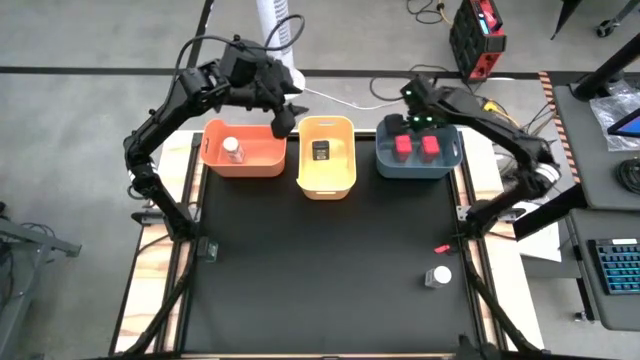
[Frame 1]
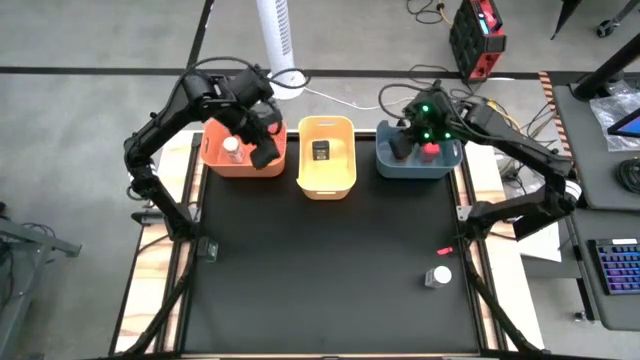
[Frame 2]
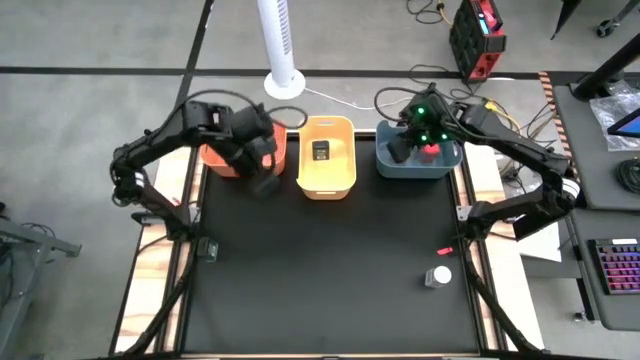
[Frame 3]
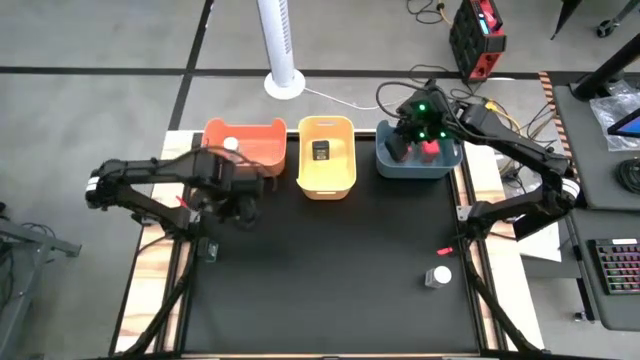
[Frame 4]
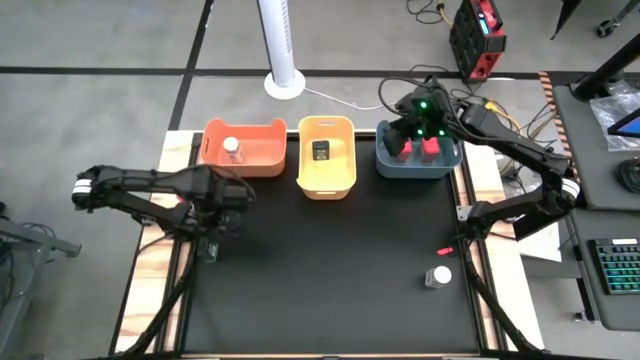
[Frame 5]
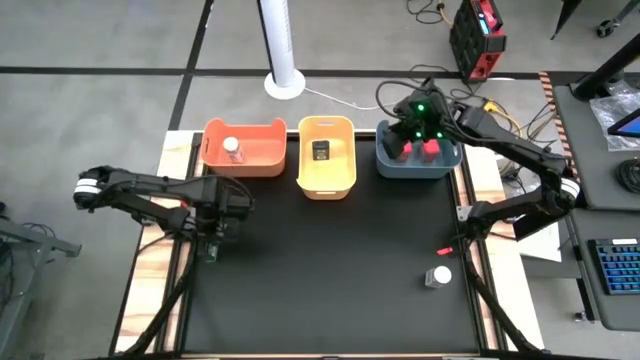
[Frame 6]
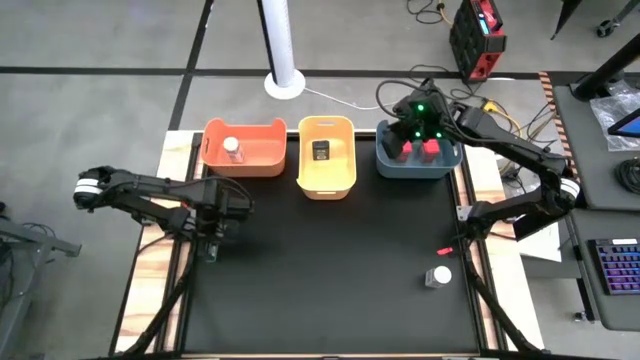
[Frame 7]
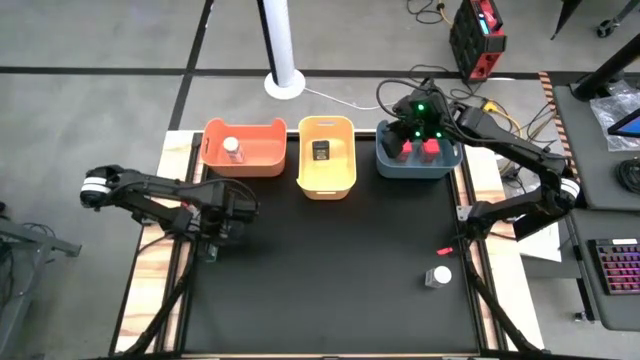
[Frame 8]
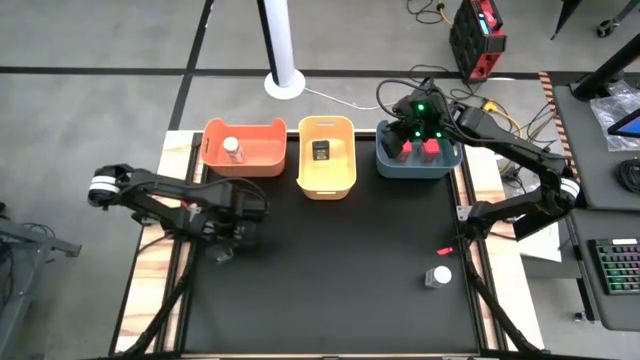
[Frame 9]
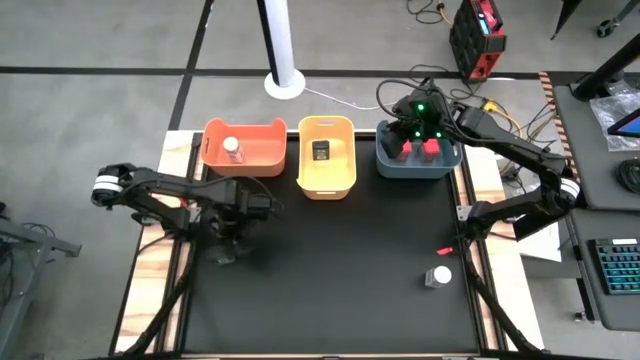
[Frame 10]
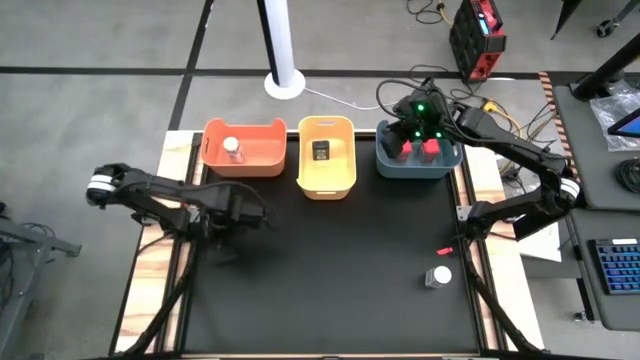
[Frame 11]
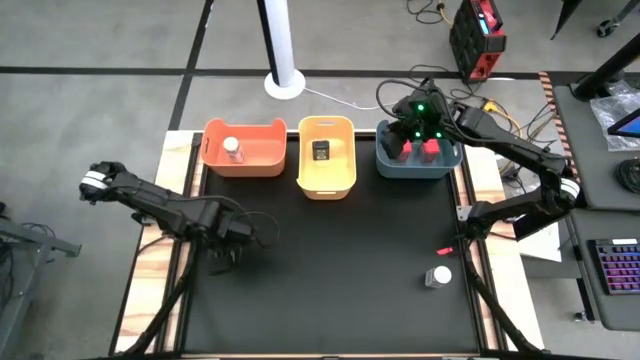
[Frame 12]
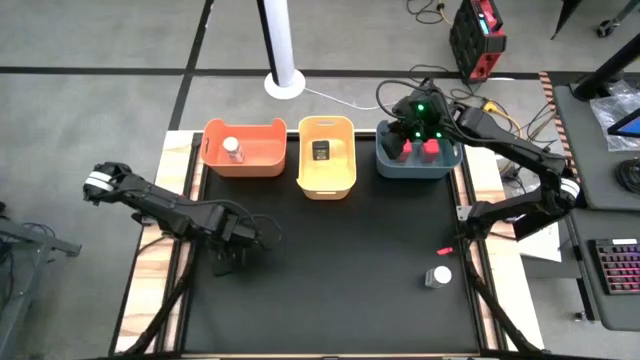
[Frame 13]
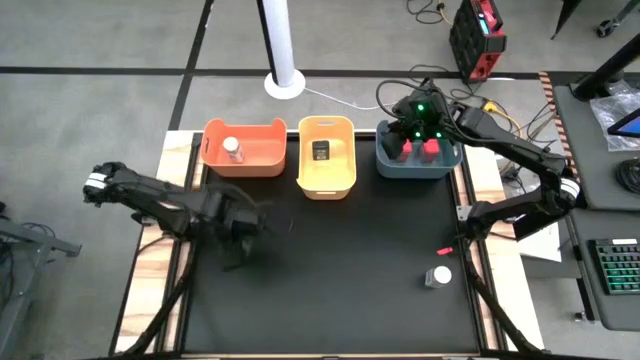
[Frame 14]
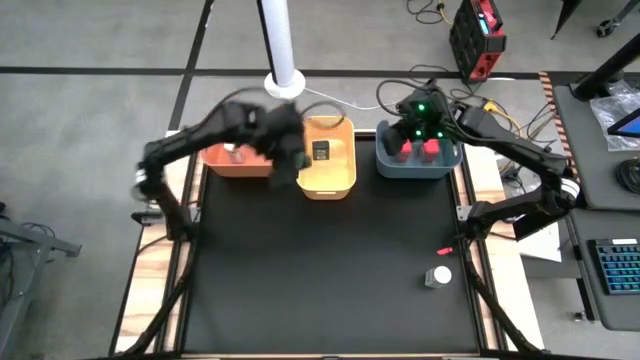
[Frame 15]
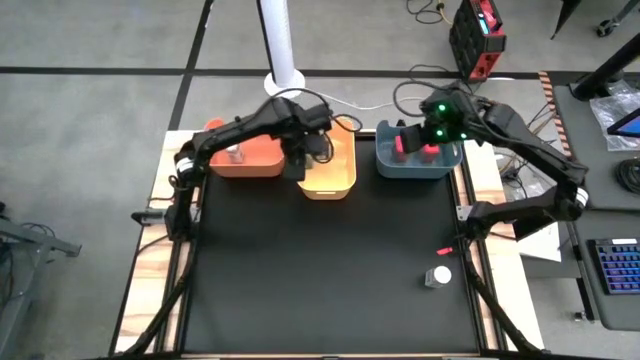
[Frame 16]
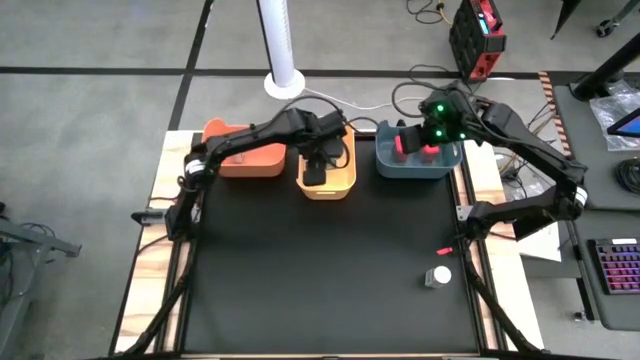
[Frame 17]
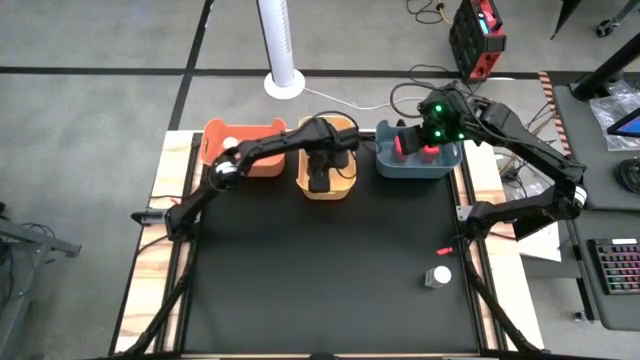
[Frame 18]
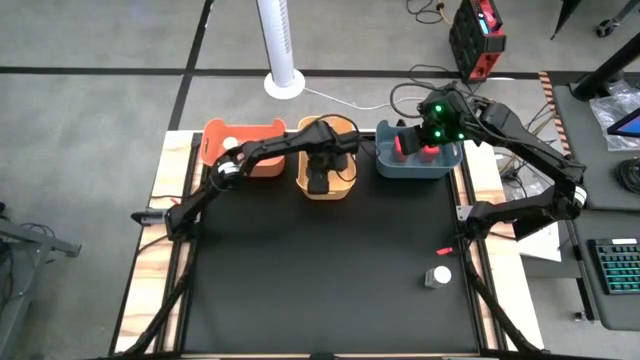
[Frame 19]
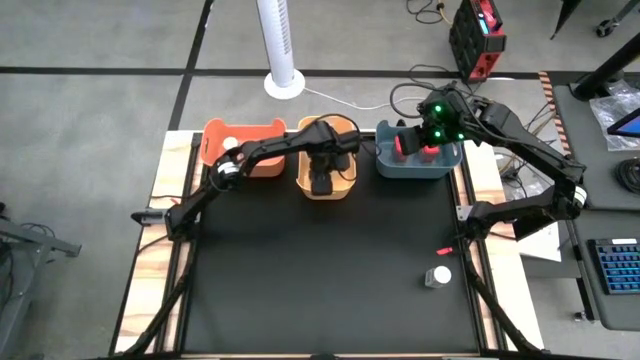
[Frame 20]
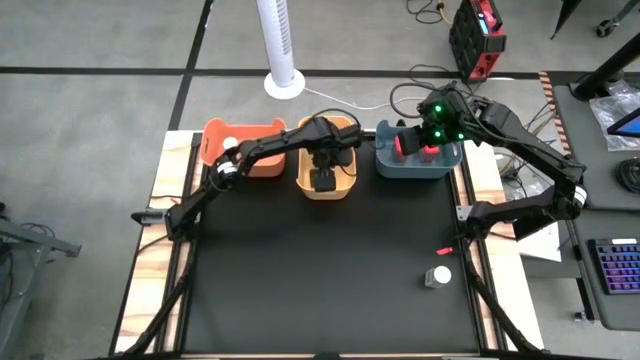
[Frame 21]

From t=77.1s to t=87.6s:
Task: Sort spices by type
Put the green spice can into the yellow bin

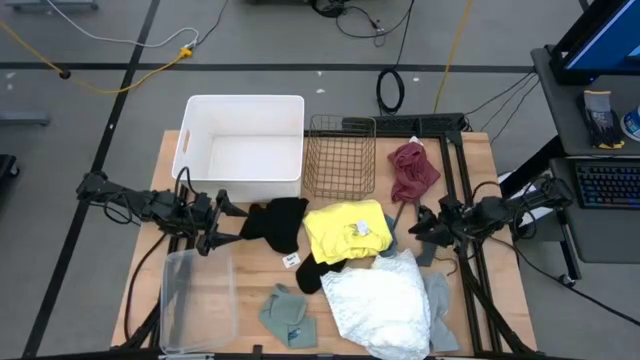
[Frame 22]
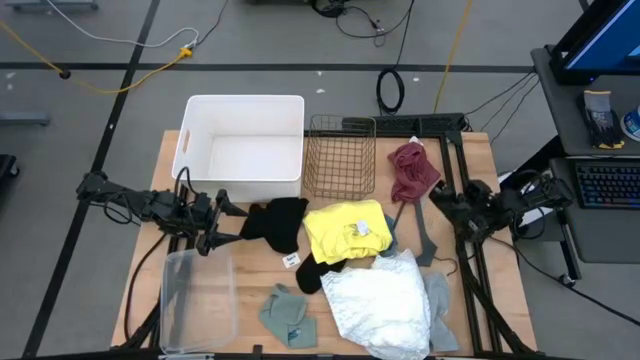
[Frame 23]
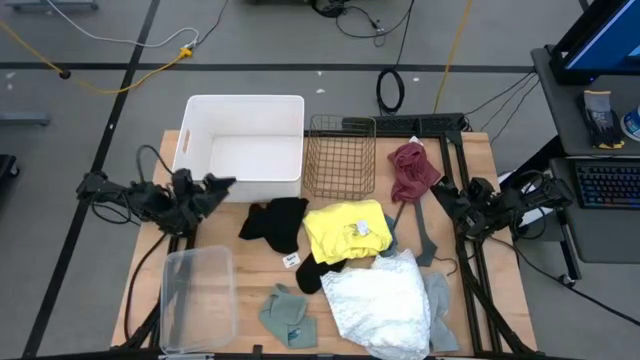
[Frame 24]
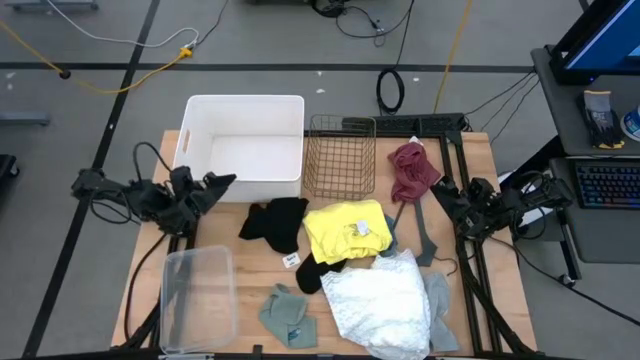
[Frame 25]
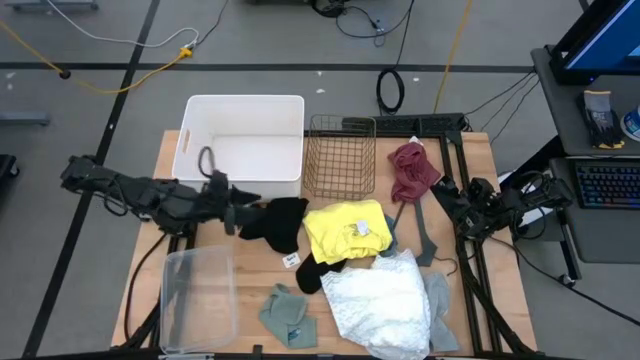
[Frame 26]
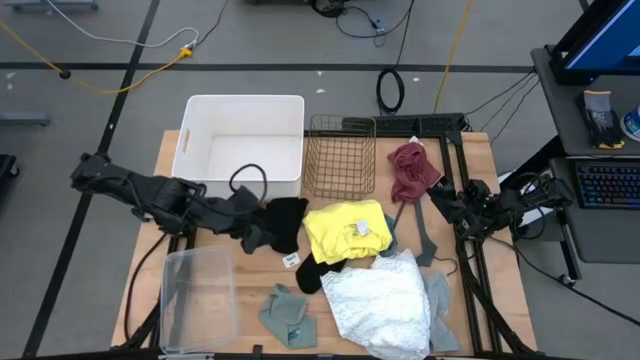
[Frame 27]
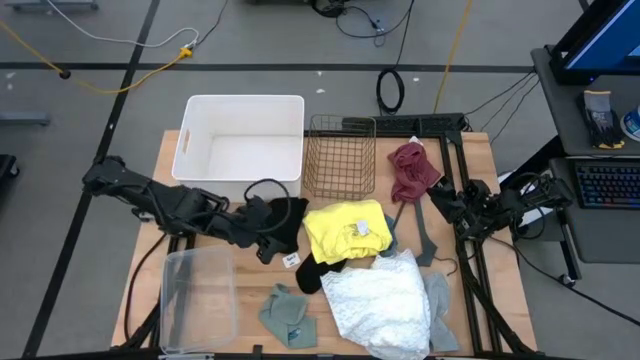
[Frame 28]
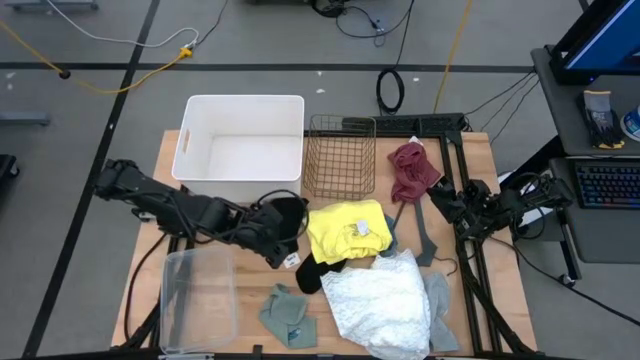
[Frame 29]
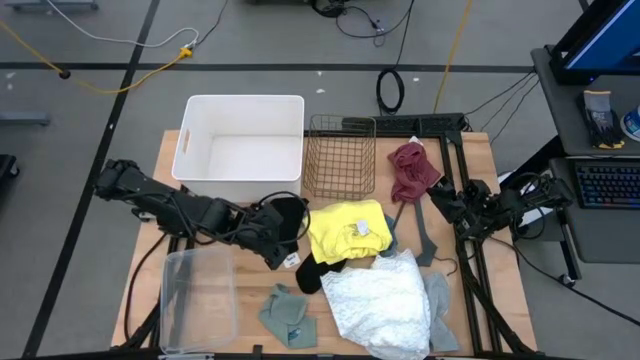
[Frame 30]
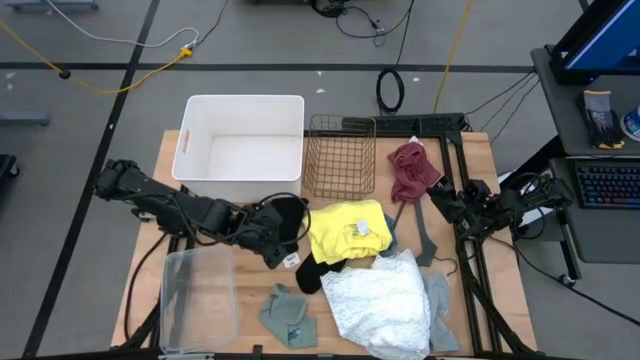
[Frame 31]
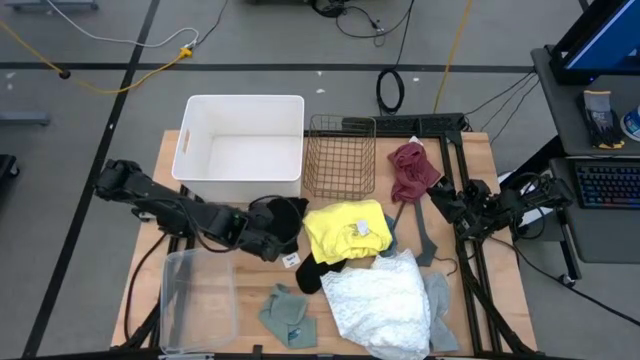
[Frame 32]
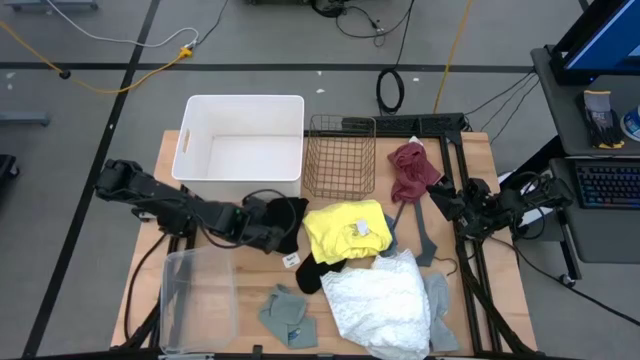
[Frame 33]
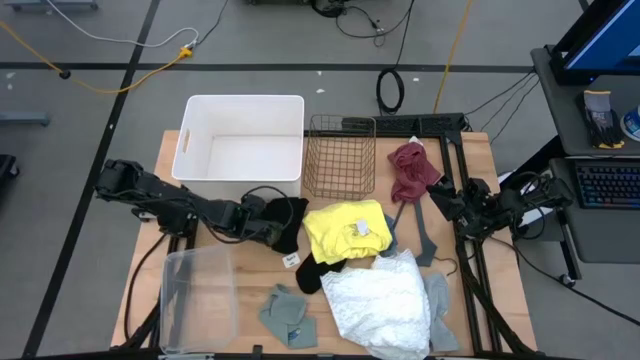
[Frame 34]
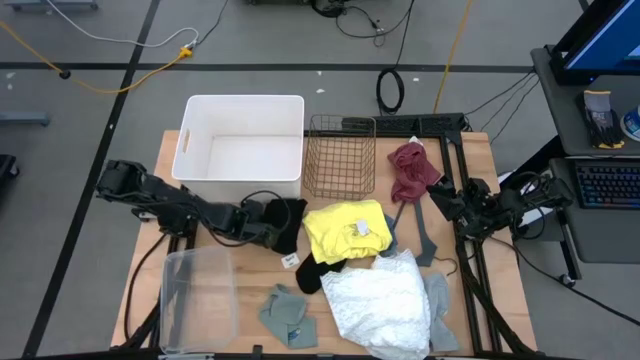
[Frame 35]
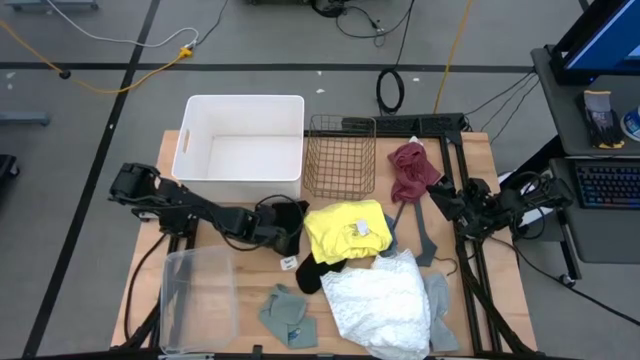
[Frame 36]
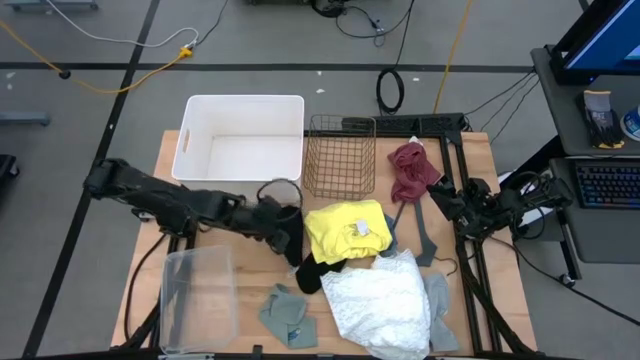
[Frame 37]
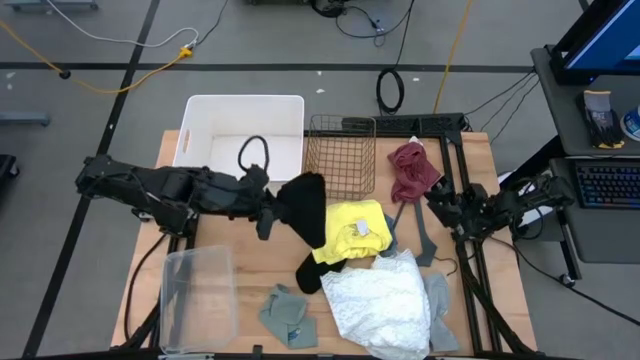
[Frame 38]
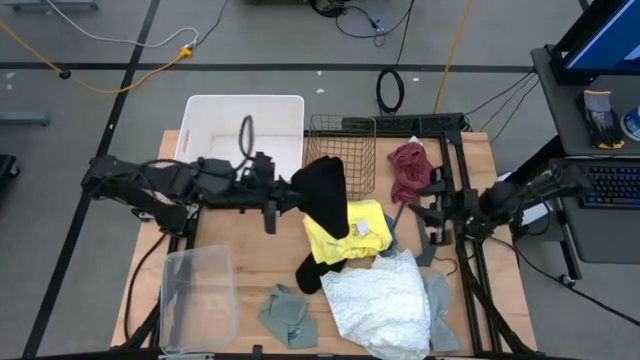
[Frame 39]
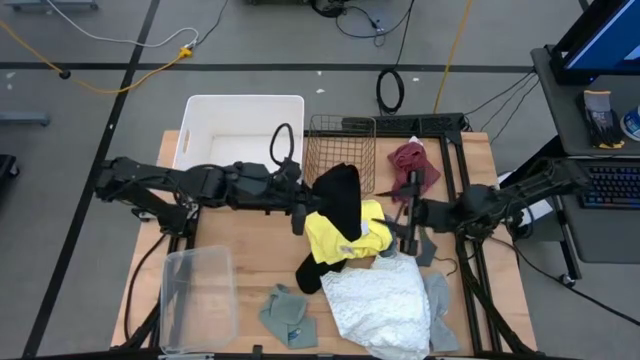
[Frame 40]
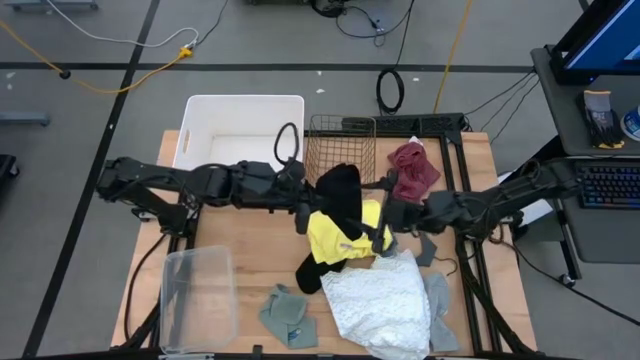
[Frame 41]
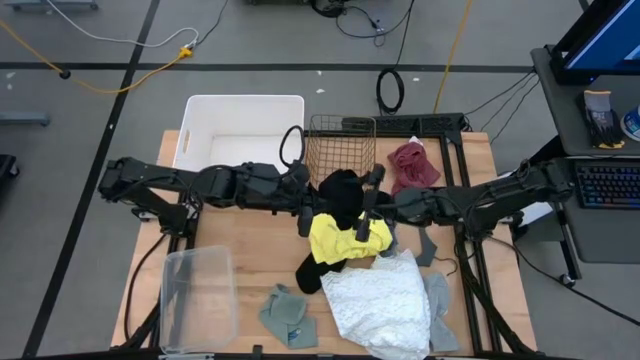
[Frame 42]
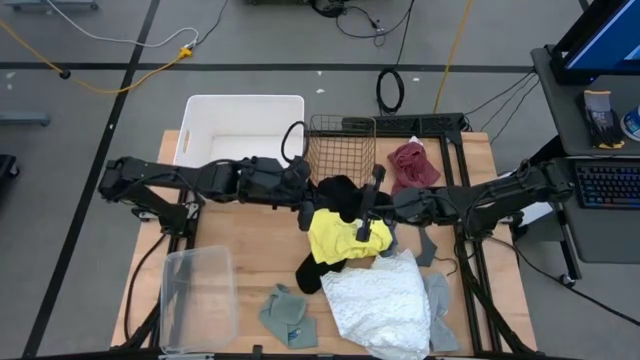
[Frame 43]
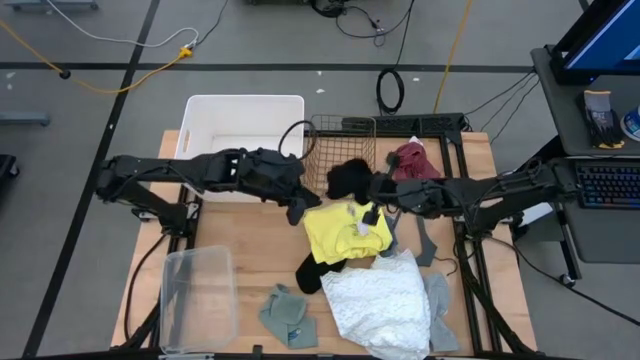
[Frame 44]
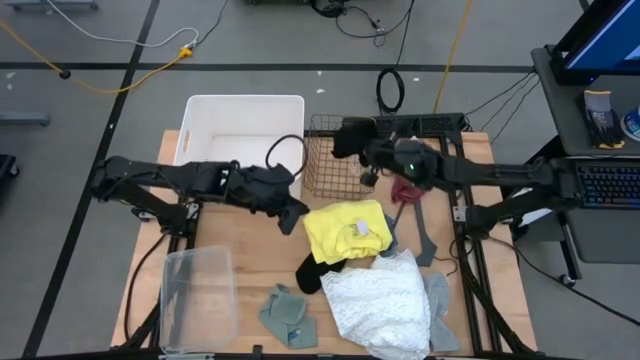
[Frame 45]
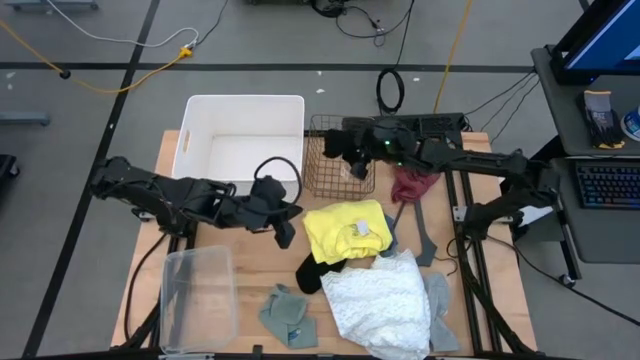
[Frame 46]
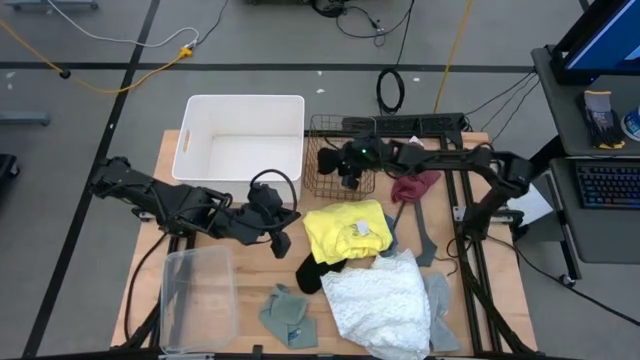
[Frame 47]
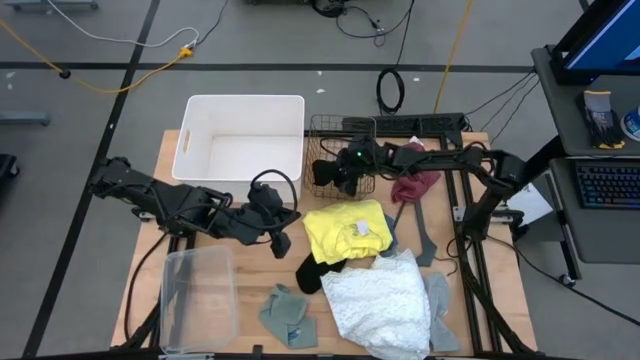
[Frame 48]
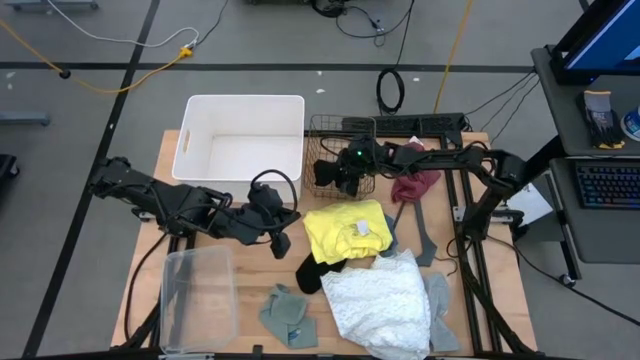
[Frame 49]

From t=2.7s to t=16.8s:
Task: Pick & Place Cloths
Put the black pants into the wire basket
